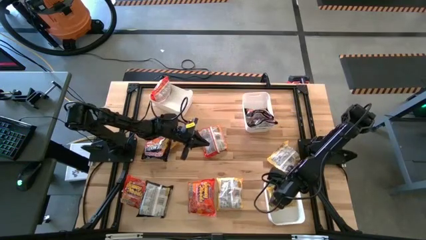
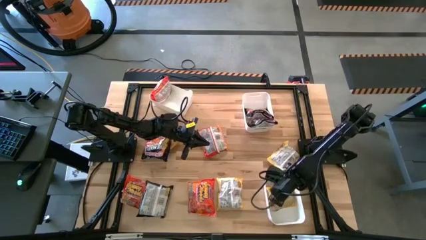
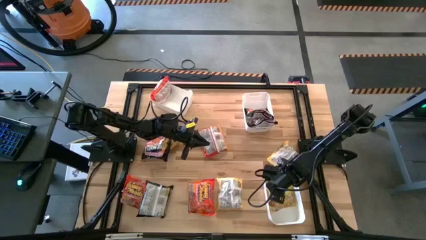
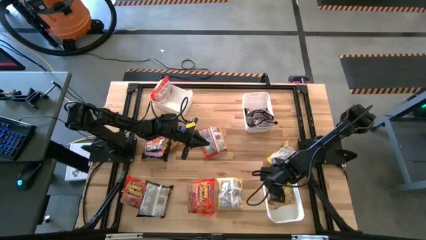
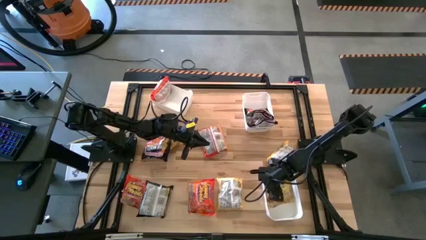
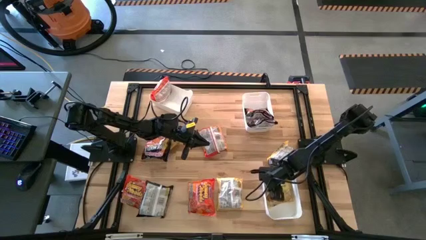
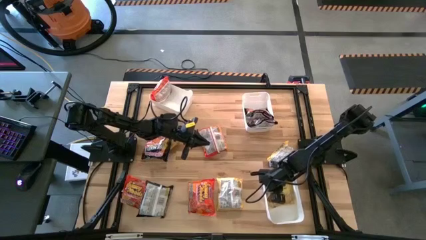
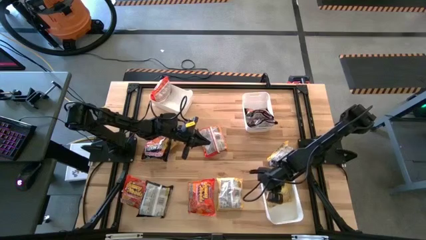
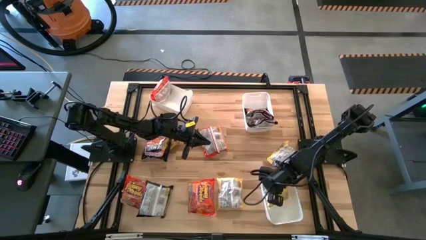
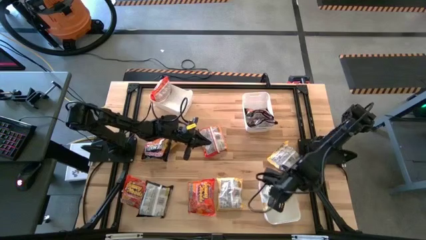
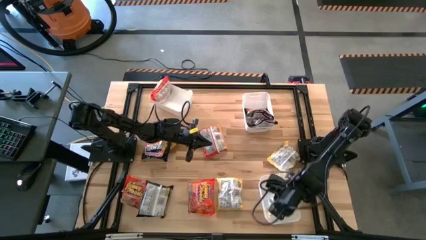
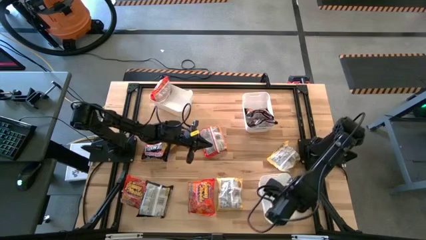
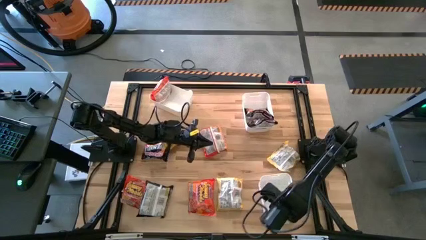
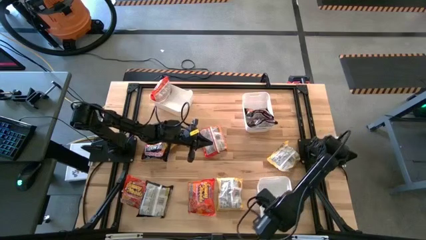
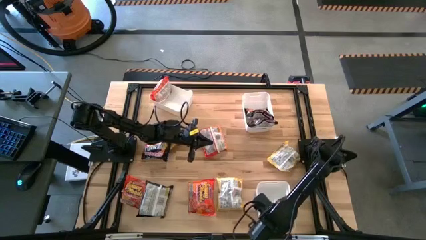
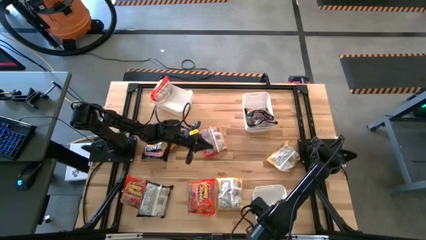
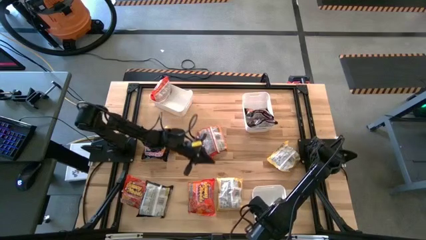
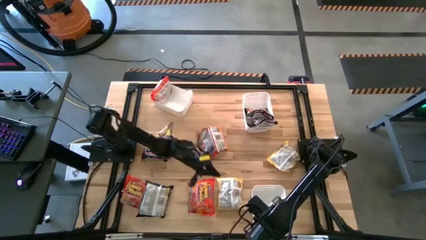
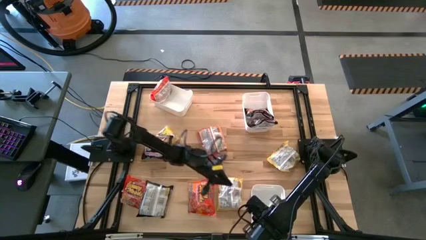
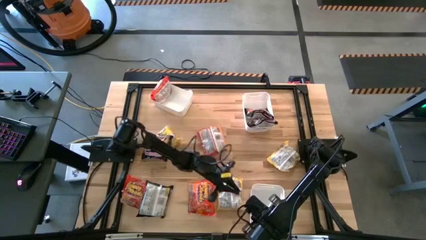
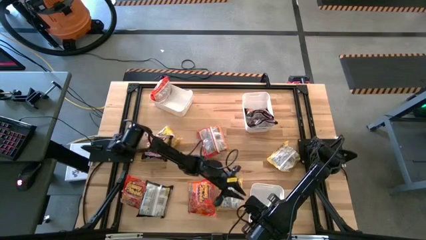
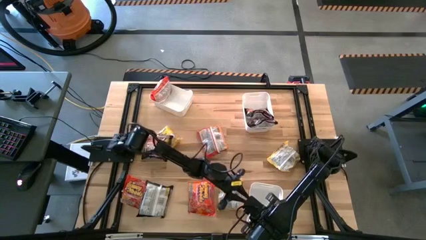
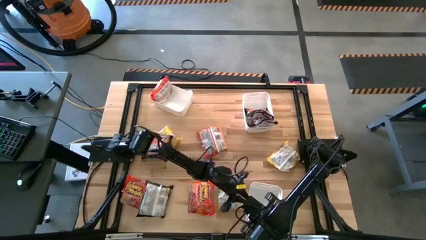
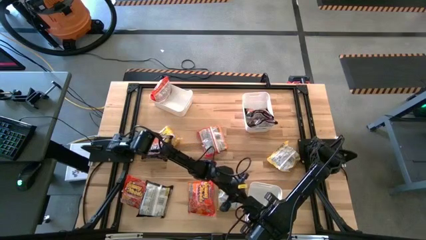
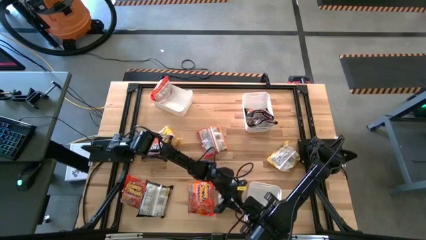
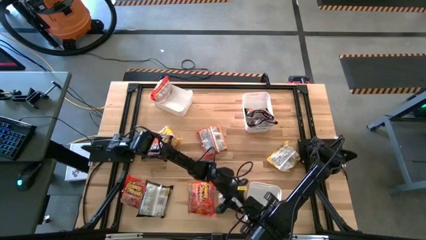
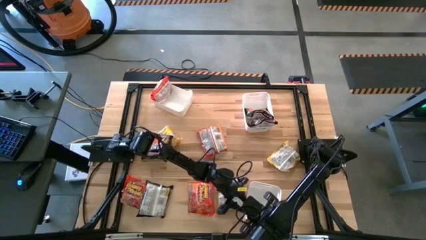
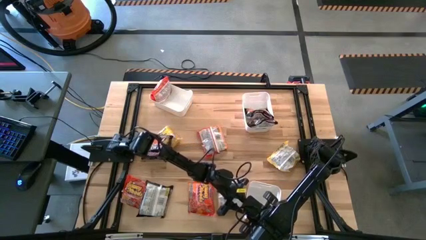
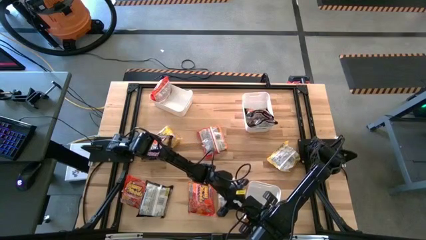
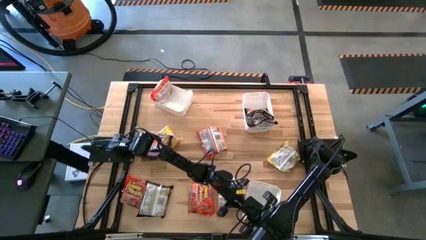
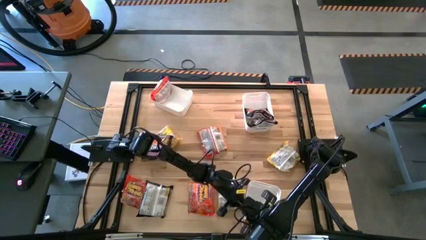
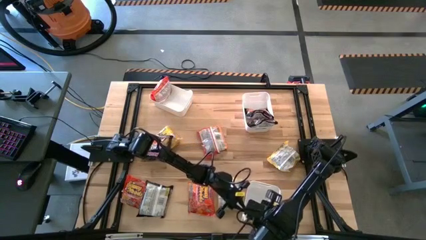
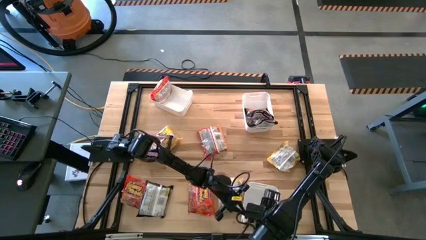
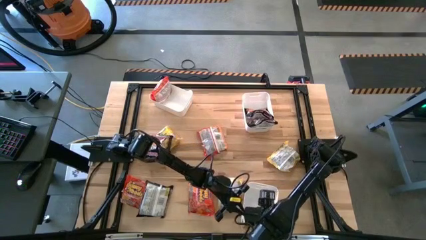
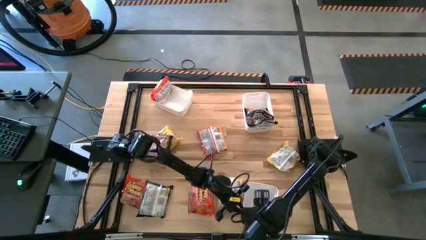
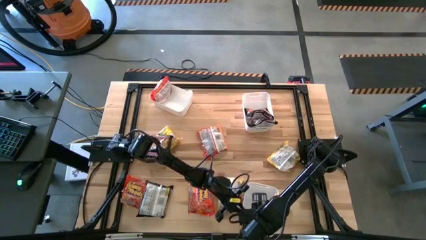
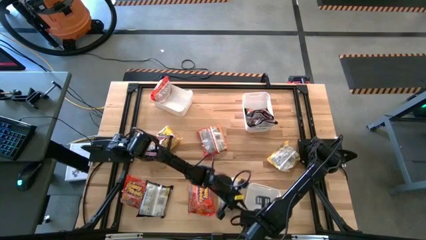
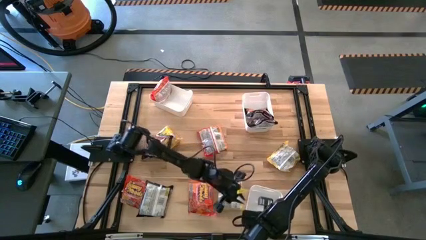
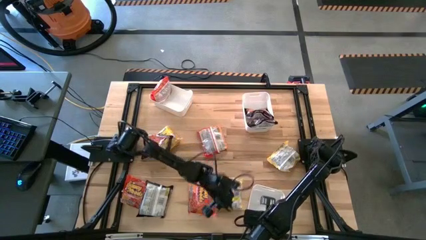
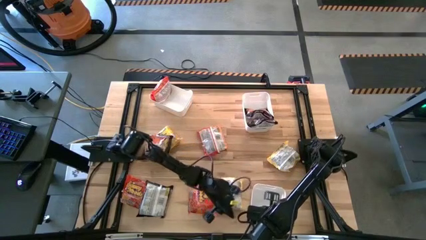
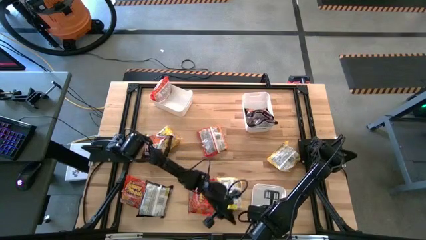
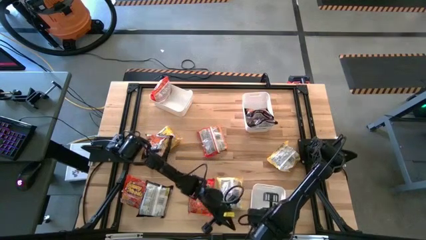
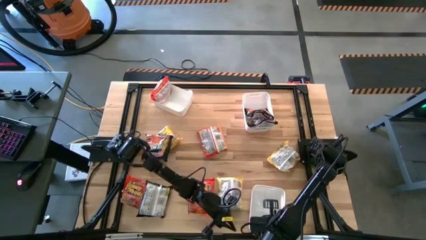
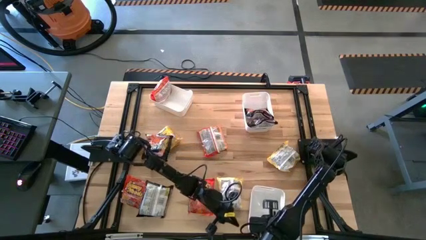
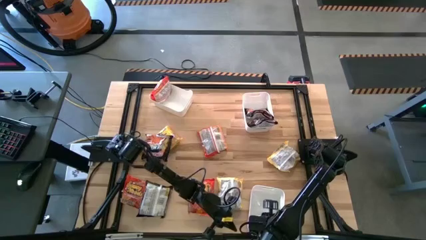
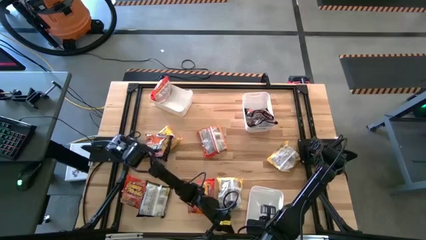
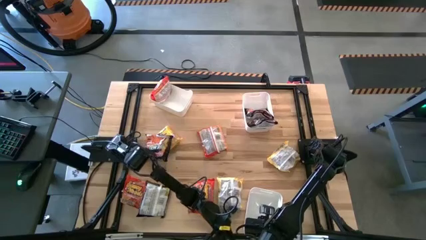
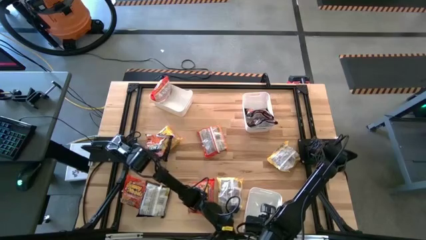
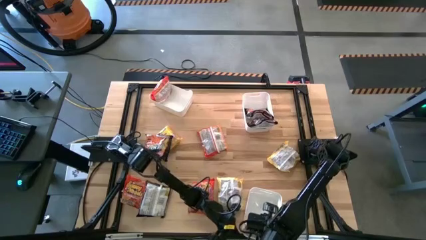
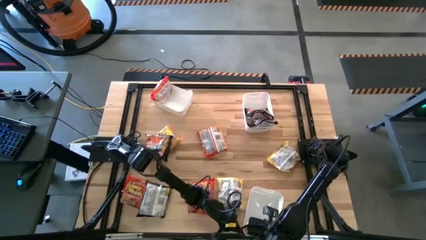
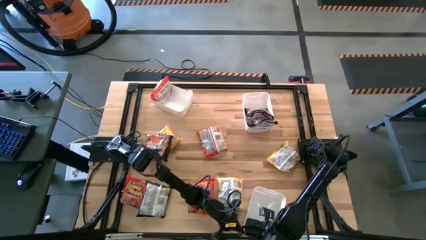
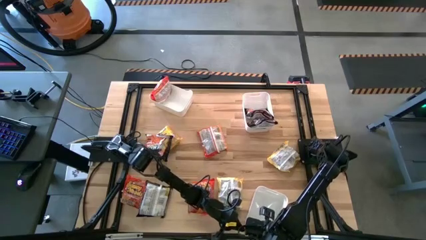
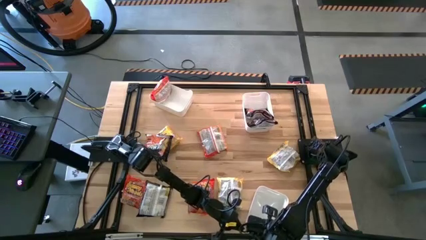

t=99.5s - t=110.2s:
Task: Sort Maruchan noodles
Adjust the yellow noodle pack in the bottom white bin

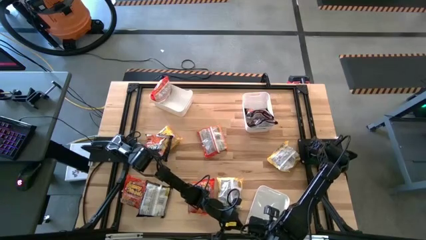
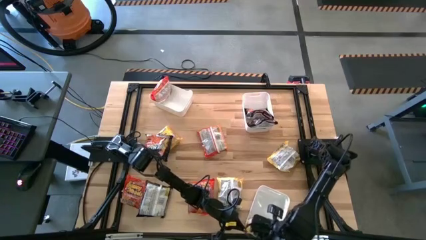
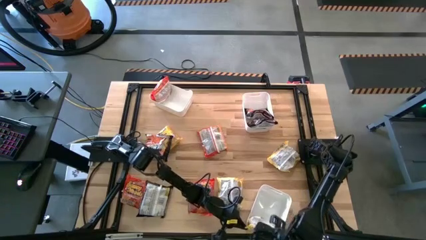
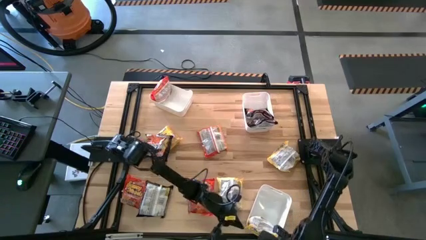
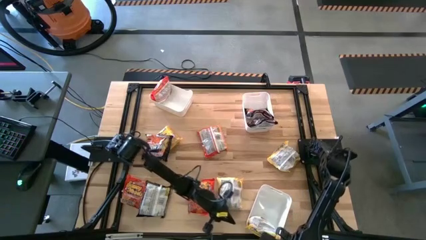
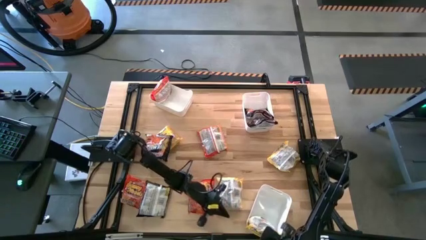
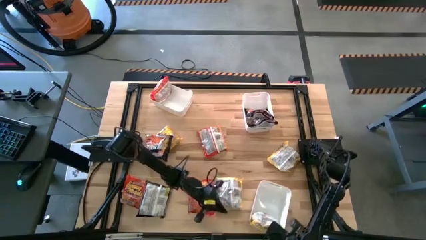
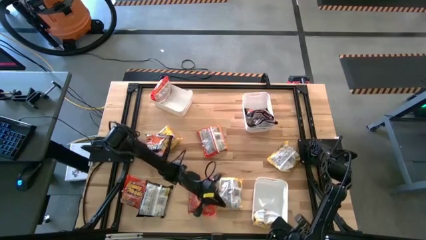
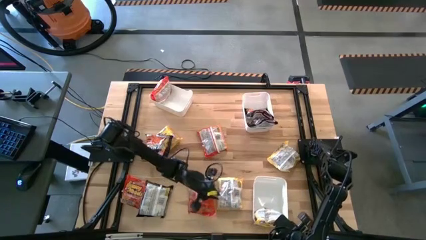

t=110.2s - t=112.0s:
Adjust the bottom white bin

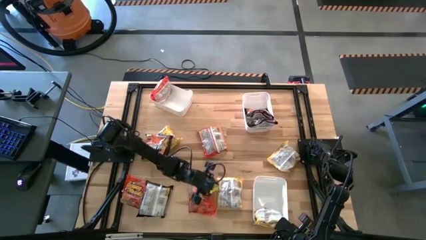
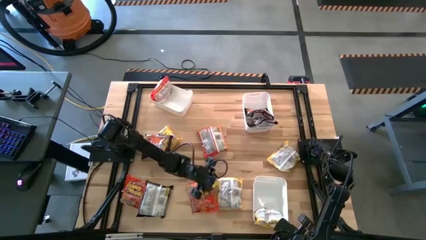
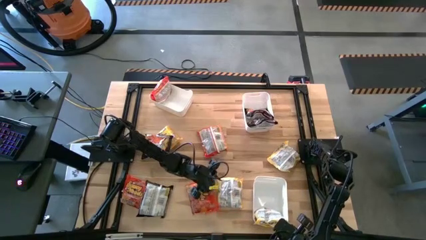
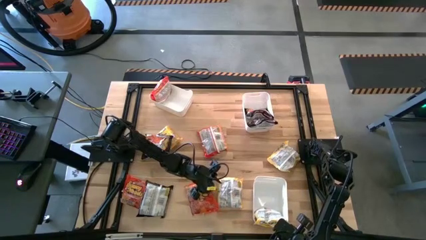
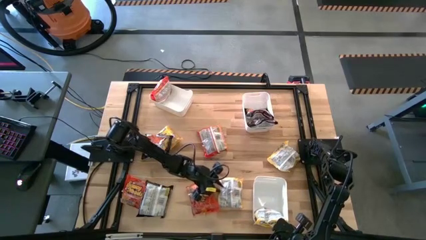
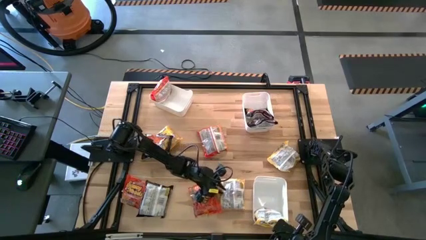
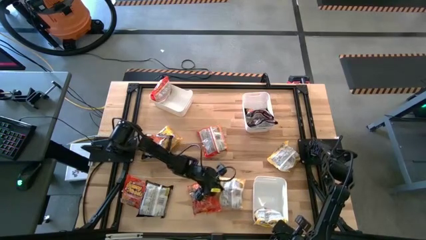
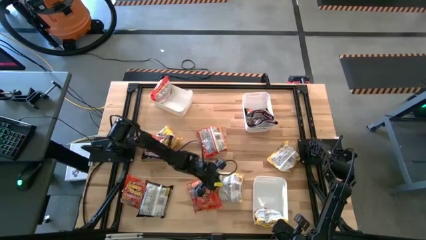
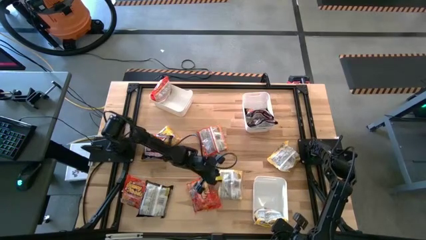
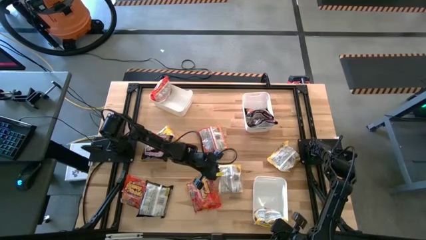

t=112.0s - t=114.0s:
Put the yellow noodle pack into the bottom white bin

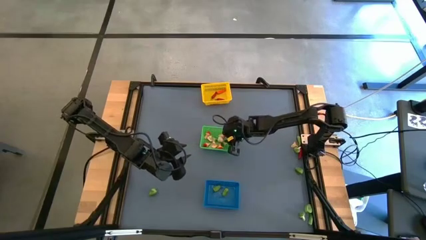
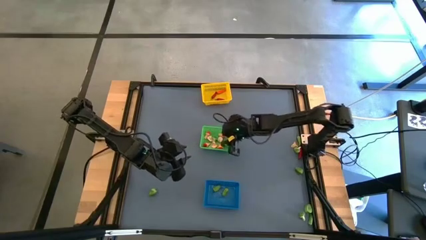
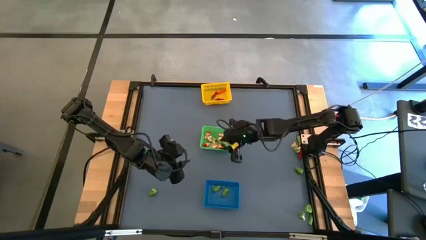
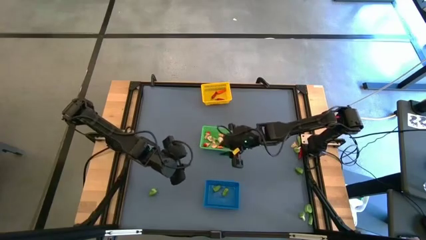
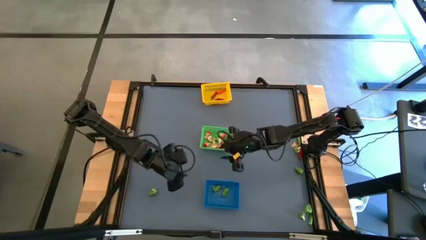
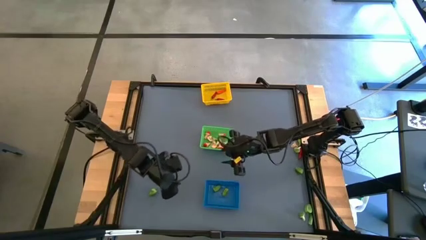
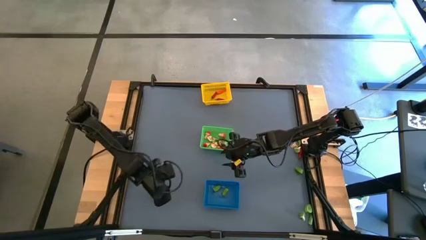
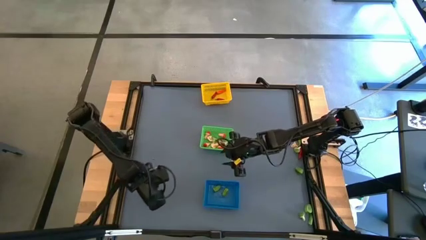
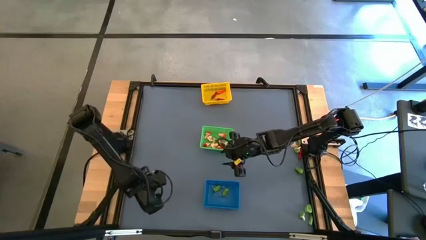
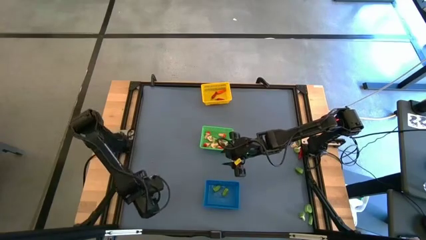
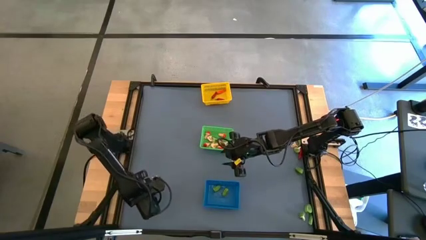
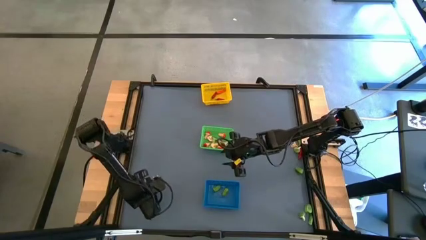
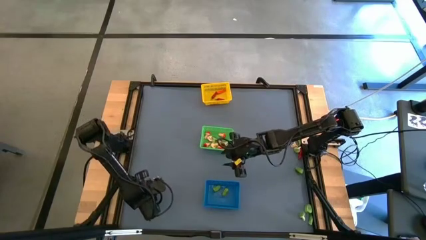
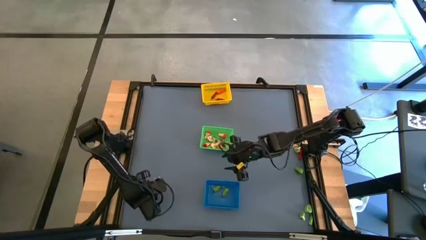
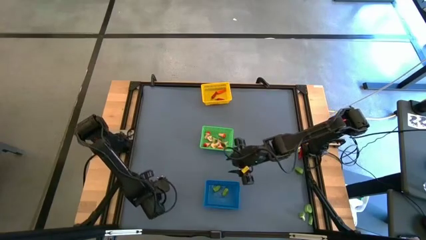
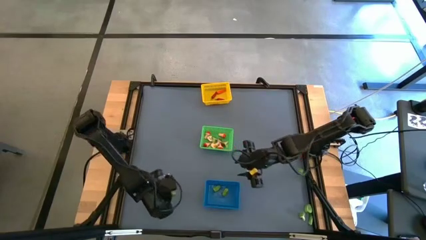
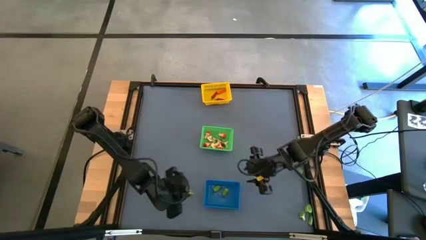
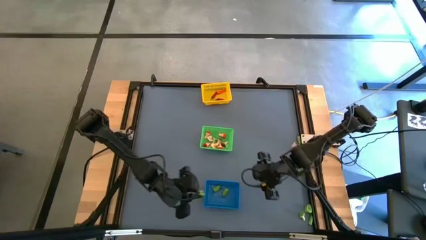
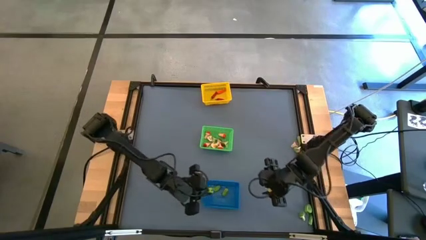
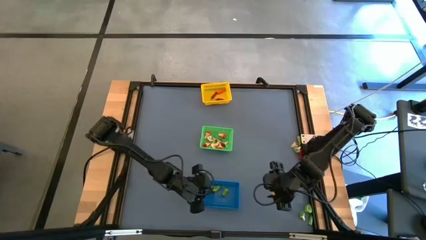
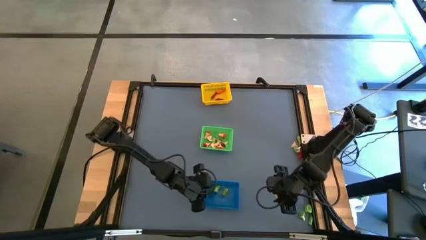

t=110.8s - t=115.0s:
Task: Sort produce into baskets
Put the green chili pepper into the blue bin
